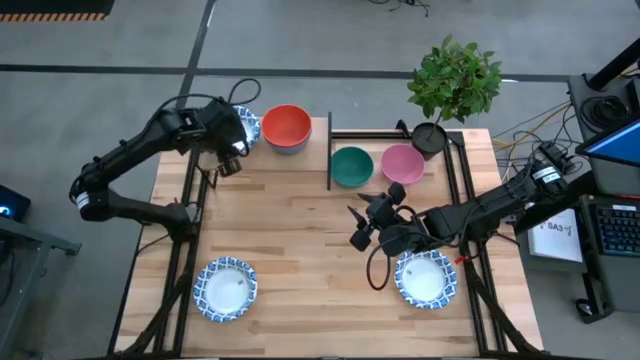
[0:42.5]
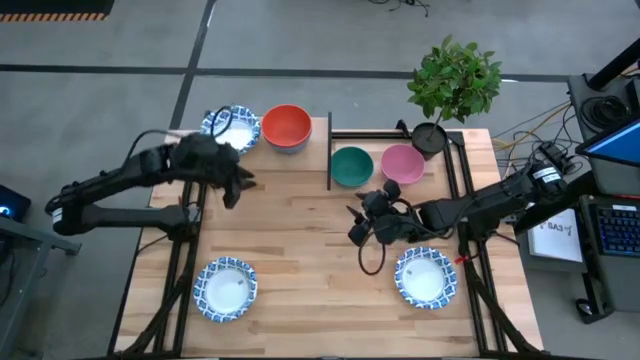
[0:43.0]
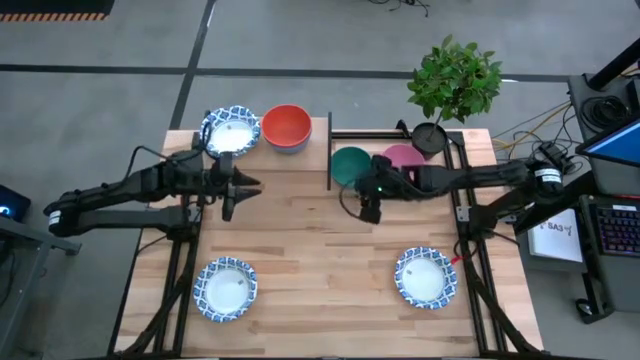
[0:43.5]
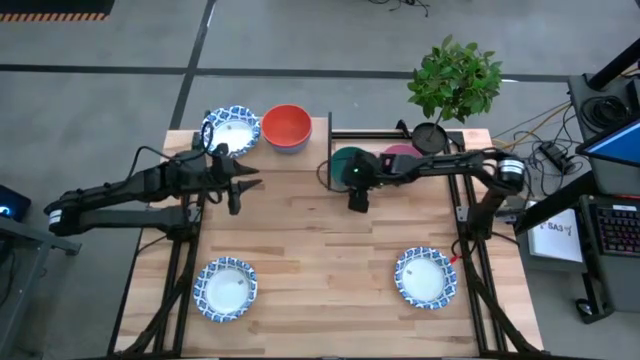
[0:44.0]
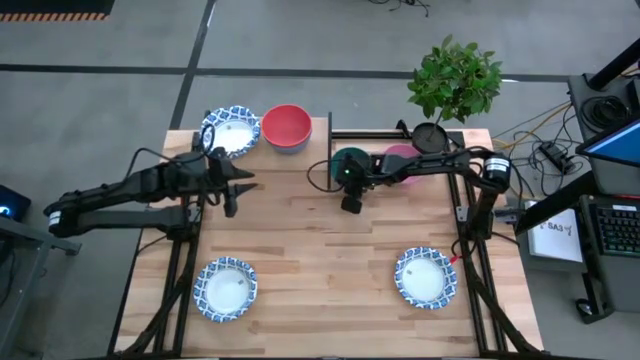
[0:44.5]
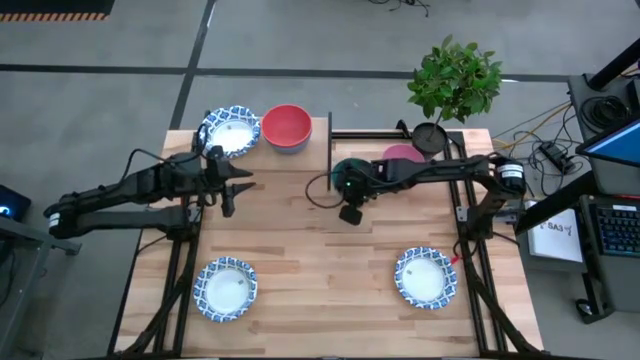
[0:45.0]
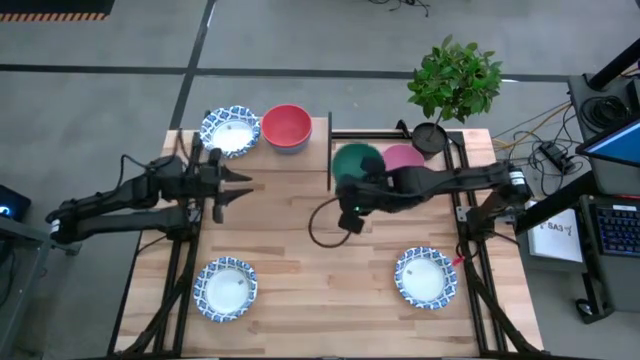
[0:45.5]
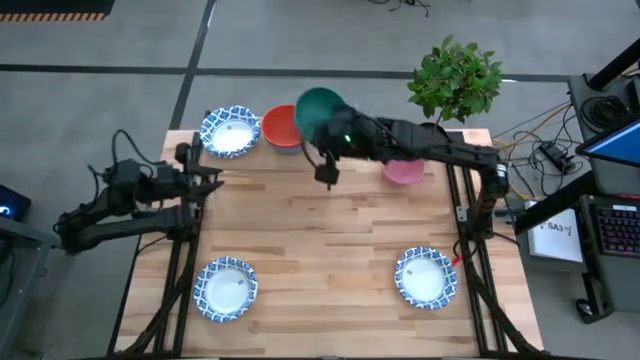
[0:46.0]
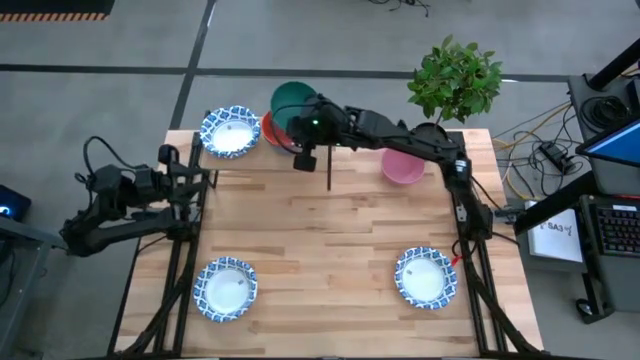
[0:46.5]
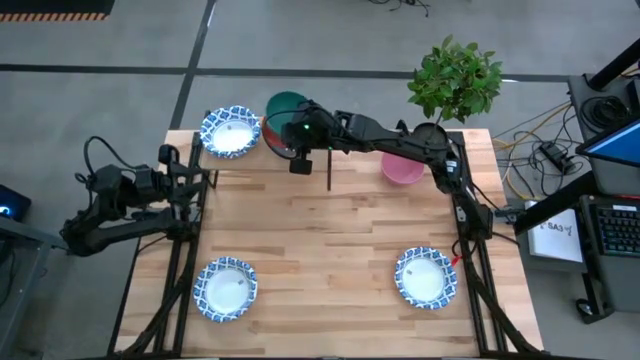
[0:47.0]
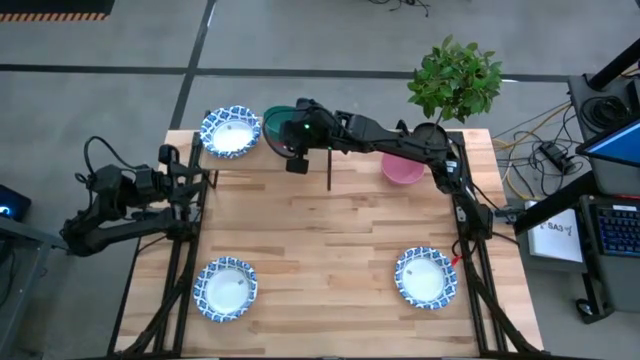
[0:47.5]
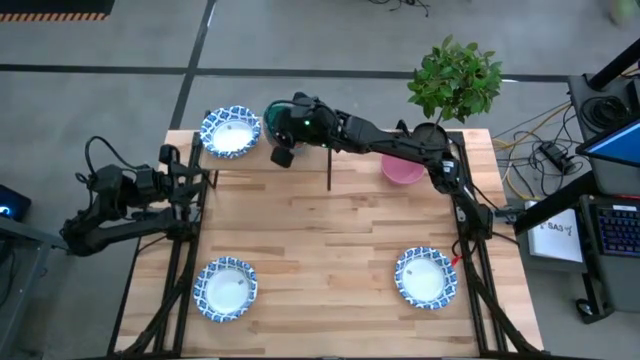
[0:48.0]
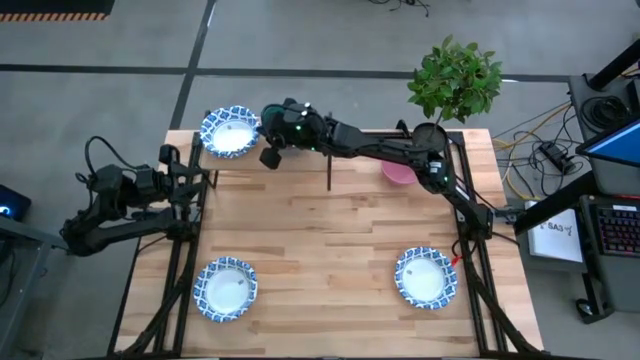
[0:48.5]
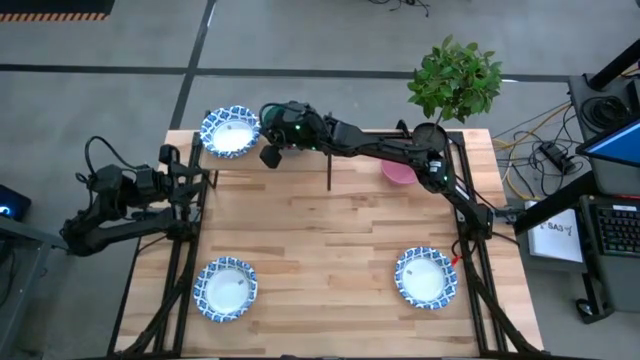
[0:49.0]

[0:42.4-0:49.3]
Task: Place and stack bowls onto a shelf
Stack the green bowl on top of the orange bowl

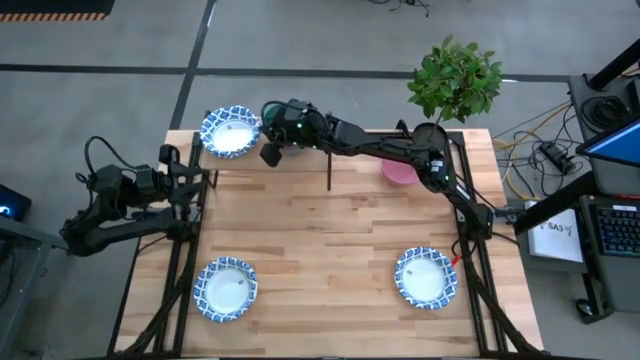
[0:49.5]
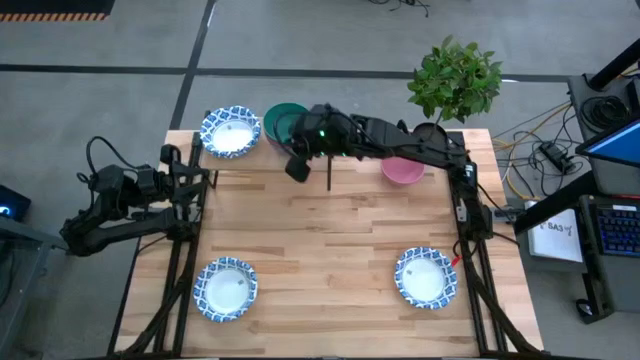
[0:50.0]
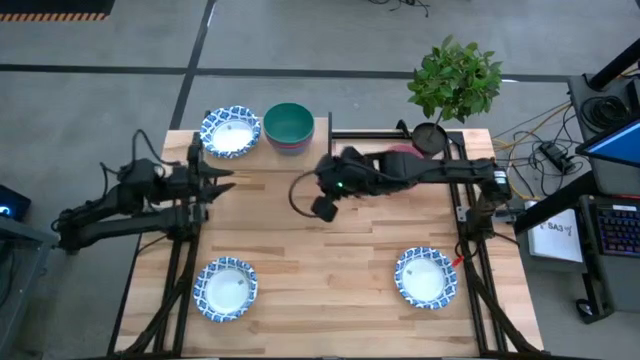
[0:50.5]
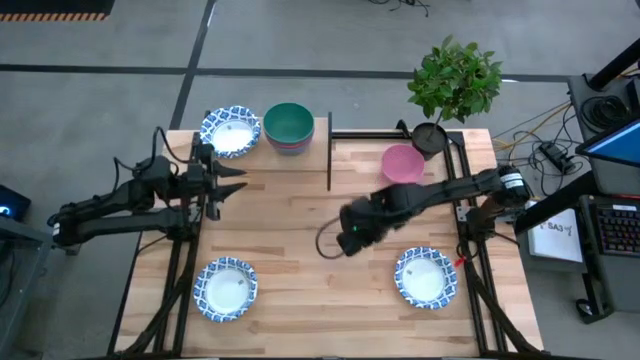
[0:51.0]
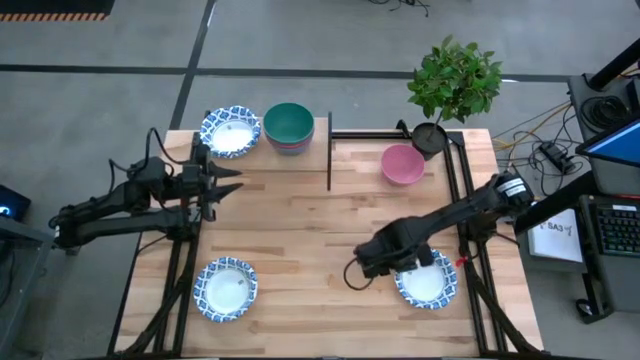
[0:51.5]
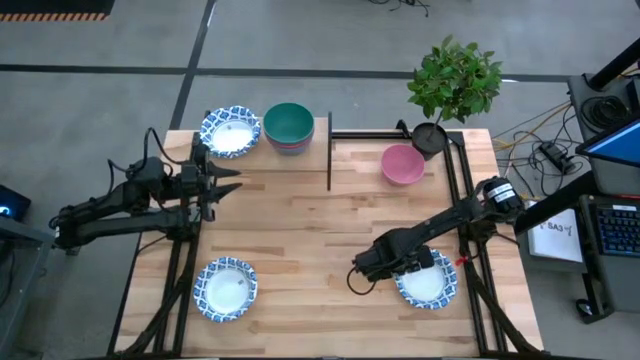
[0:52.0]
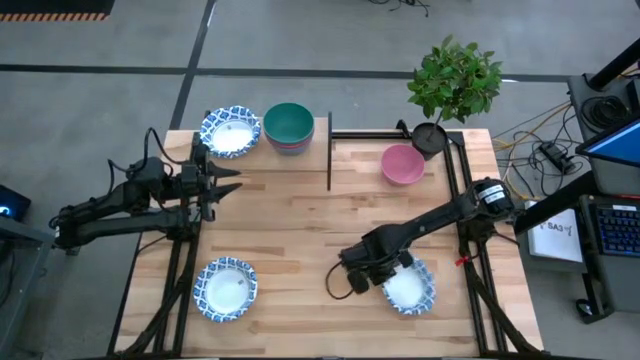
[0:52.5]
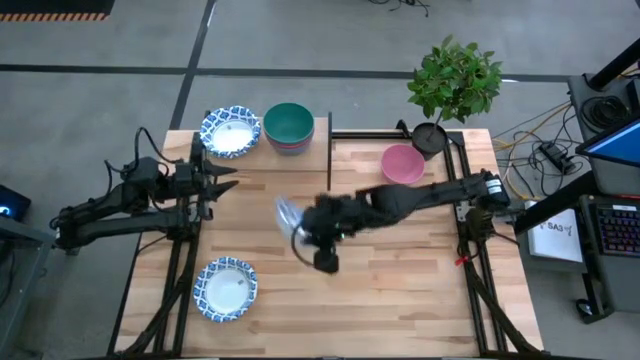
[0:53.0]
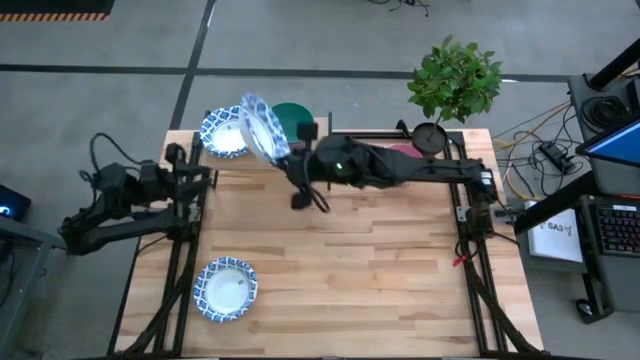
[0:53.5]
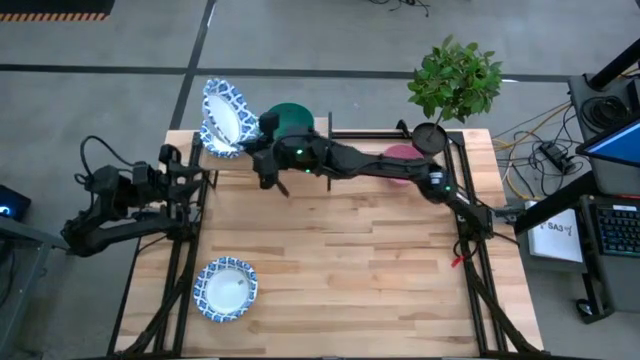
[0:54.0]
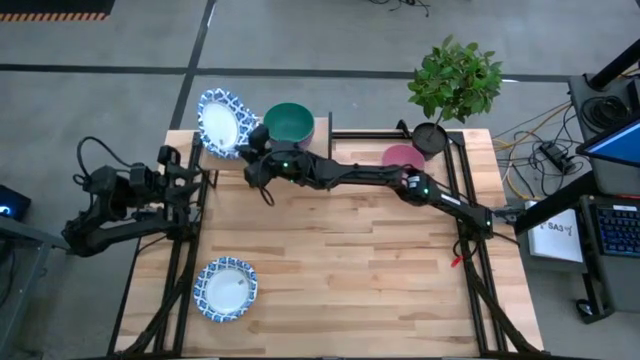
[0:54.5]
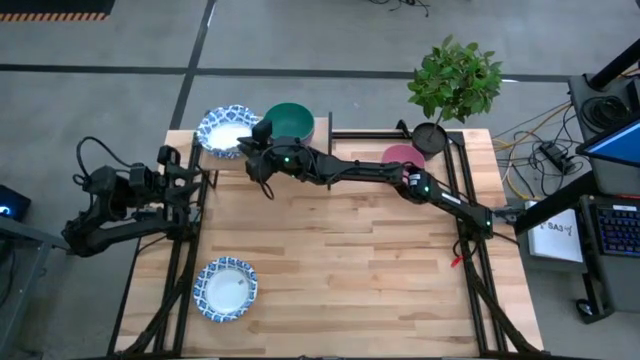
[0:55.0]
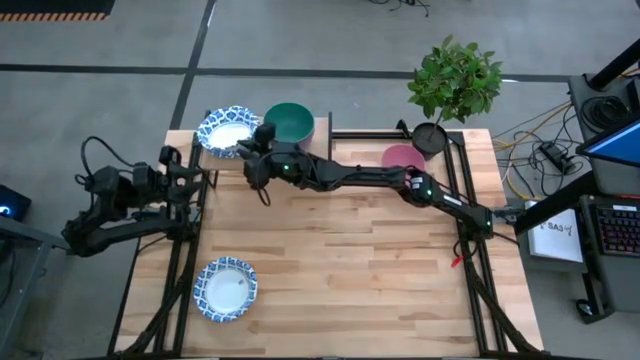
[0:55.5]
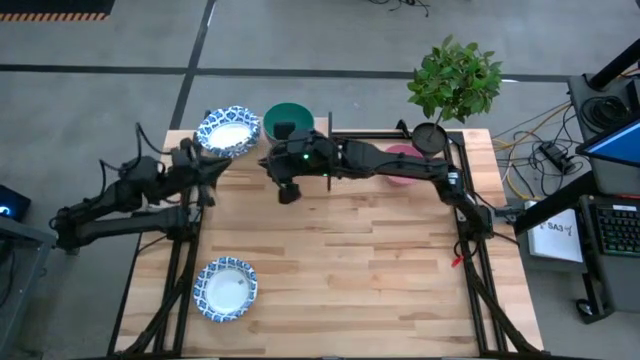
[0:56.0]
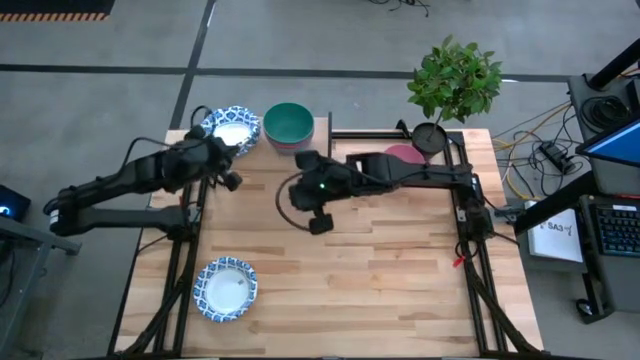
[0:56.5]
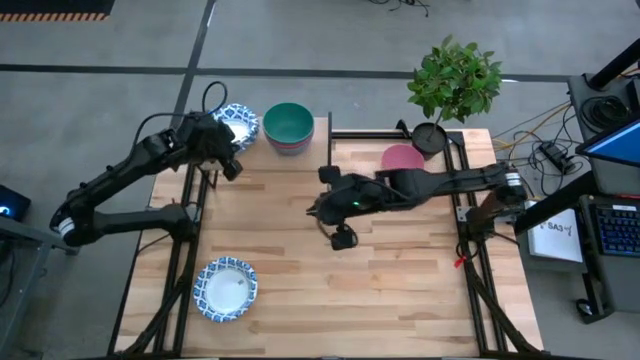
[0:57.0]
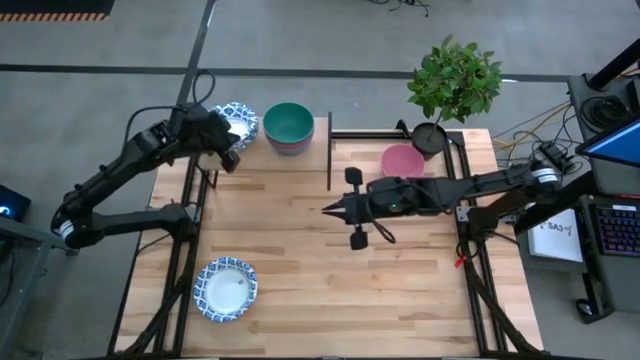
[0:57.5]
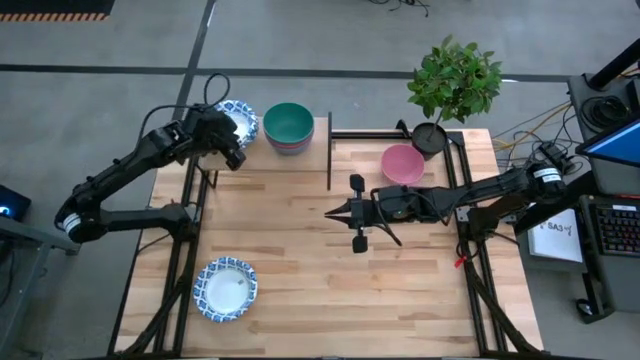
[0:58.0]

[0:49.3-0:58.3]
Stack the right white and blue bowl on top of the white and blue bowl

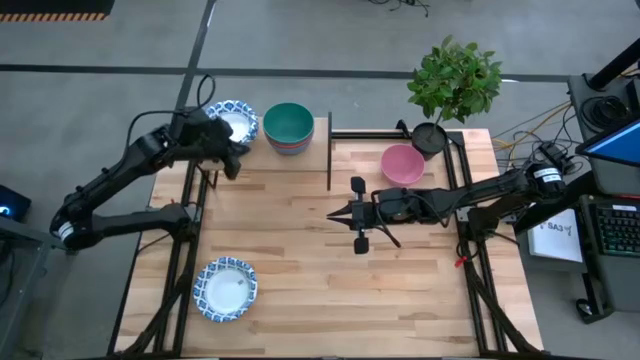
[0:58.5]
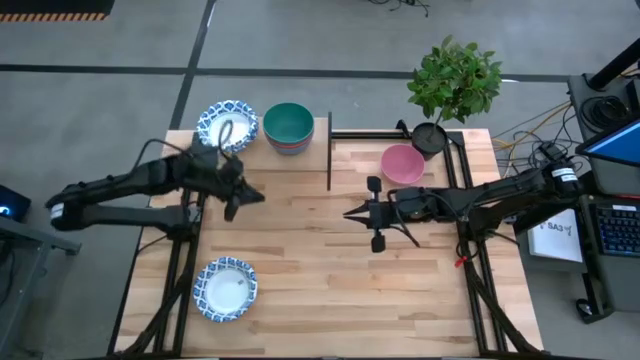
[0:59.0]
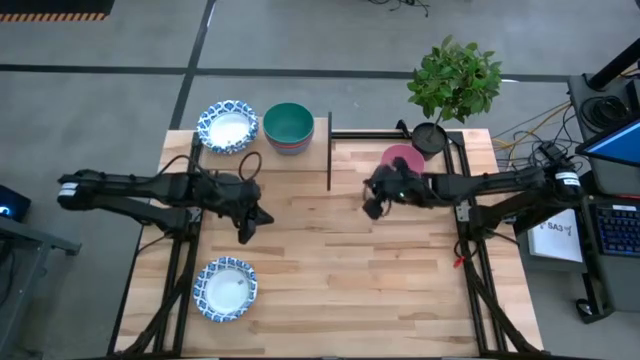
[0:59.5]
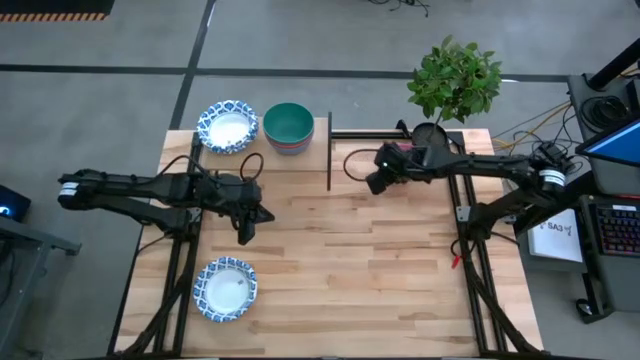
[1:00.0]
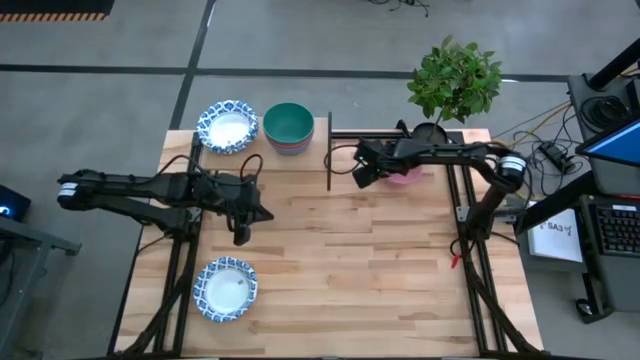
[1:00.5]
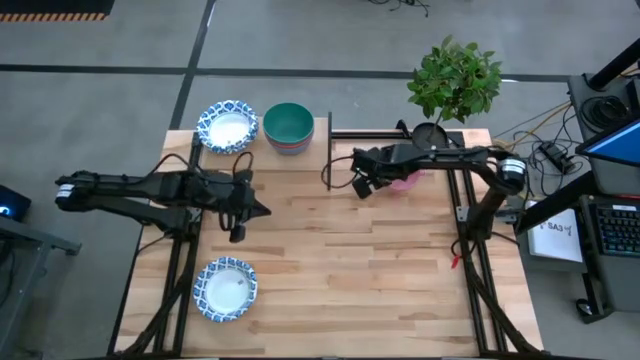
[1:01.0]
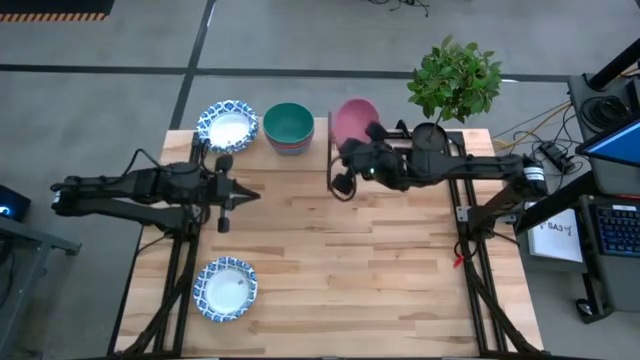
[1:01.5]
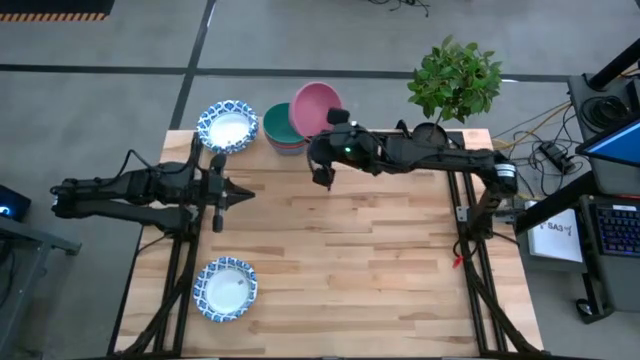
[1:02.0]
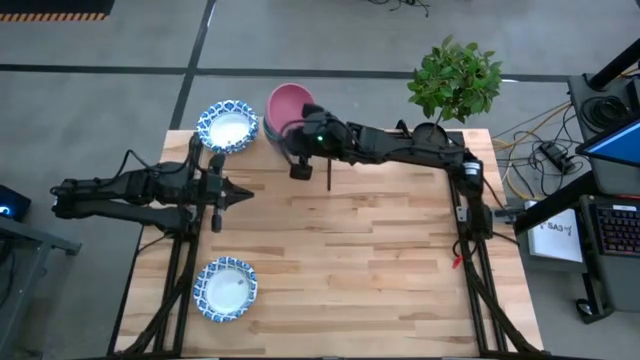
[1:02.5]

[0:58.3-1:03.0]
Stack the pink bowl on top of the green bowl

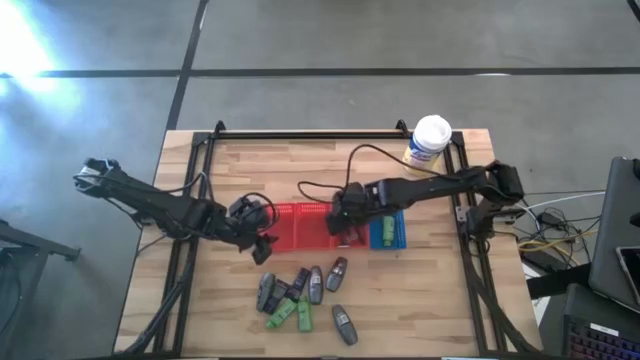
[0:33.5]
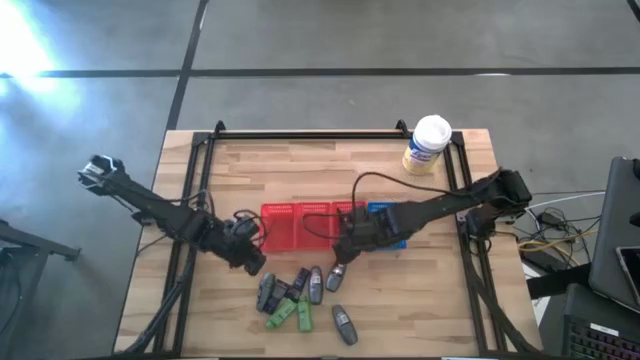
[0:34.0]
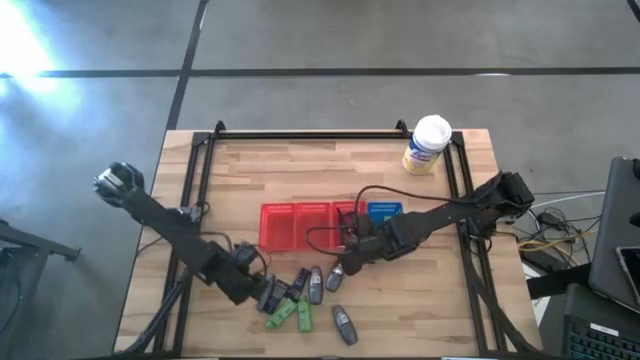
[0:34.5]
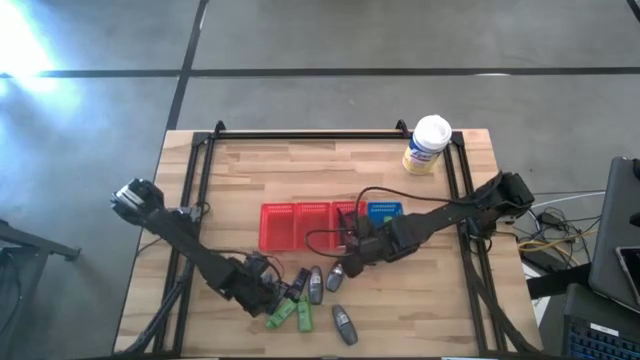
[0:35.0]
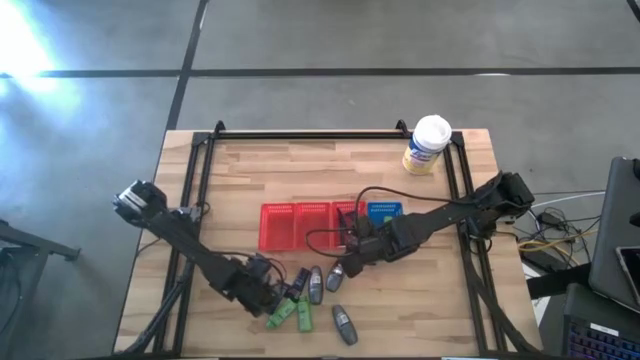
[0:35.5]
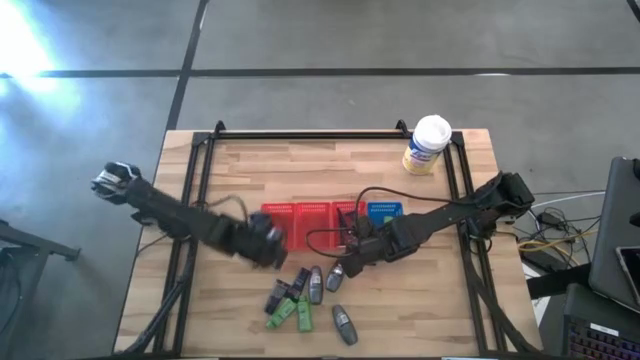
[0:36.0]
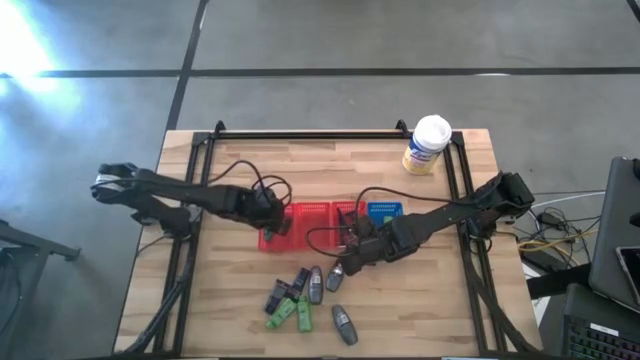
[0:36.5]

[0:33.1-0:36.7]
Task: Pick & Place Travel size toiletries
Put the gray deodorant into the left red bin
